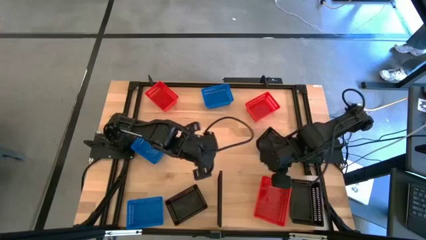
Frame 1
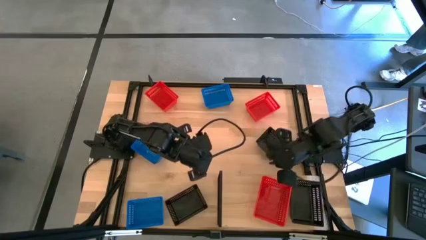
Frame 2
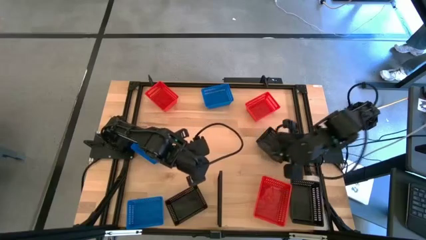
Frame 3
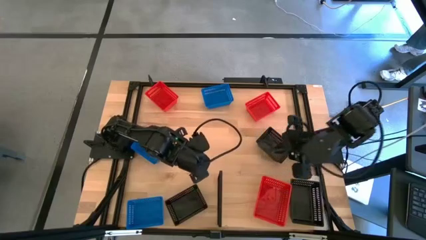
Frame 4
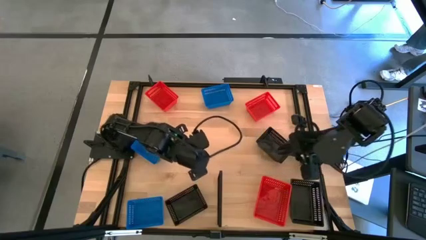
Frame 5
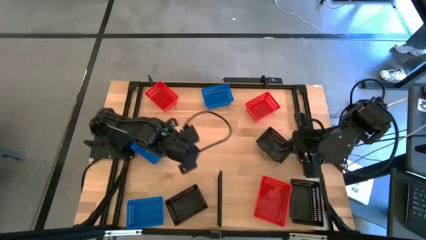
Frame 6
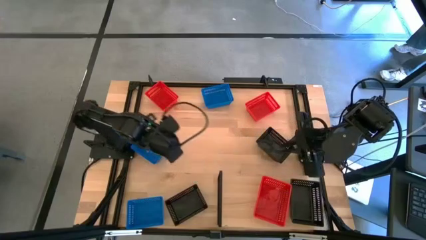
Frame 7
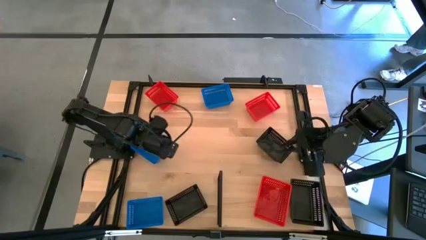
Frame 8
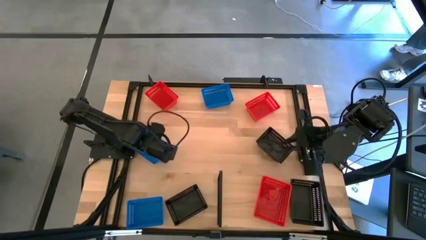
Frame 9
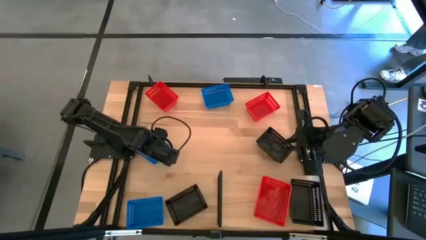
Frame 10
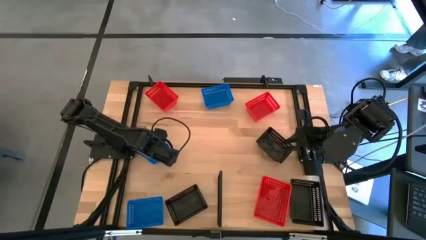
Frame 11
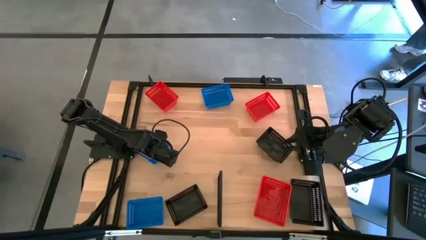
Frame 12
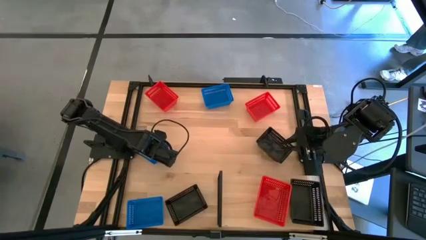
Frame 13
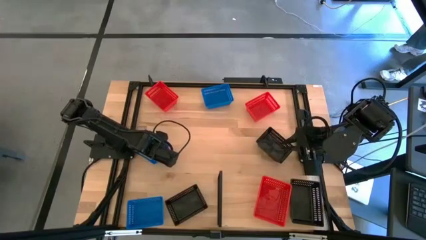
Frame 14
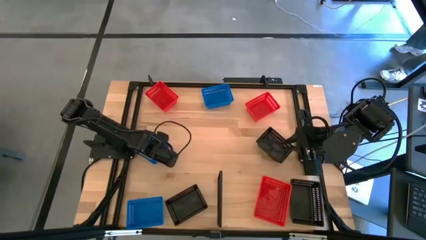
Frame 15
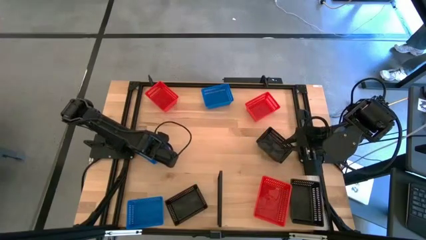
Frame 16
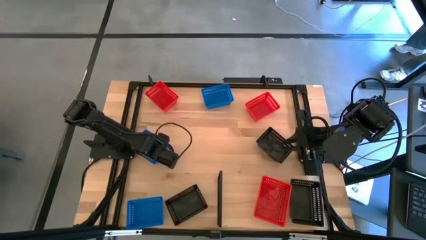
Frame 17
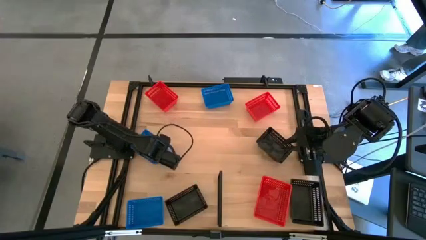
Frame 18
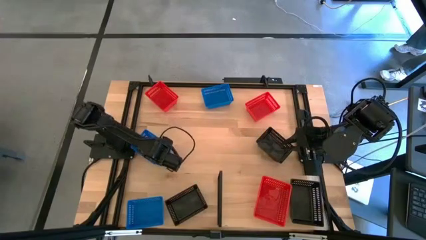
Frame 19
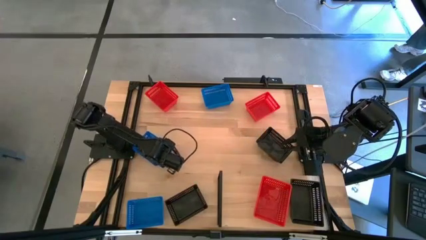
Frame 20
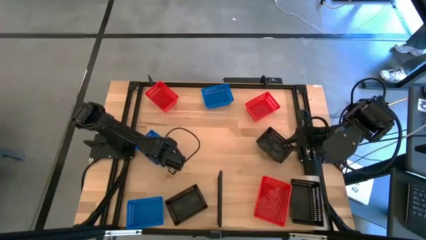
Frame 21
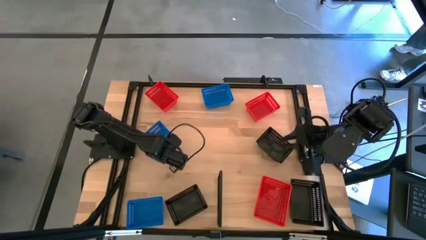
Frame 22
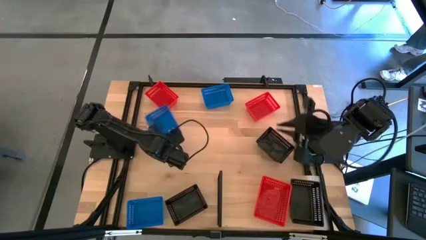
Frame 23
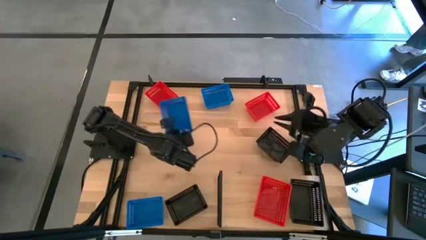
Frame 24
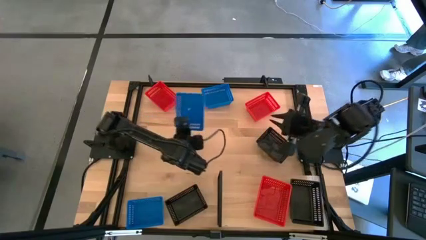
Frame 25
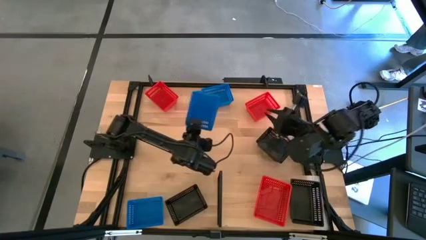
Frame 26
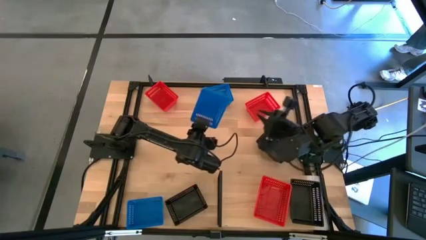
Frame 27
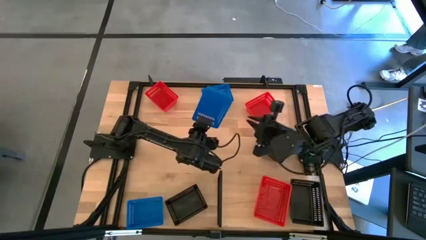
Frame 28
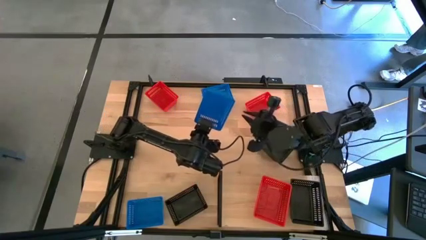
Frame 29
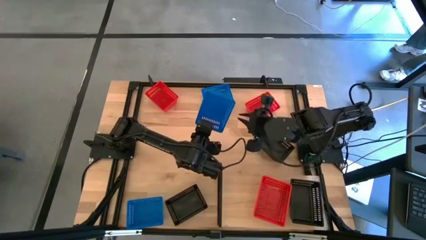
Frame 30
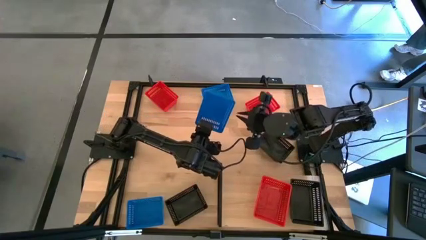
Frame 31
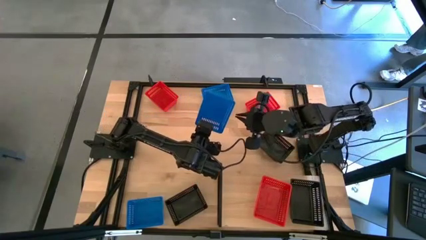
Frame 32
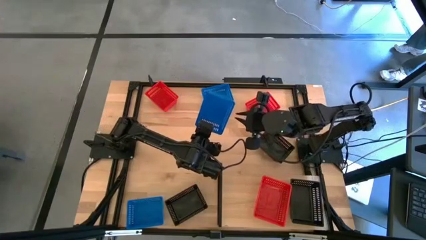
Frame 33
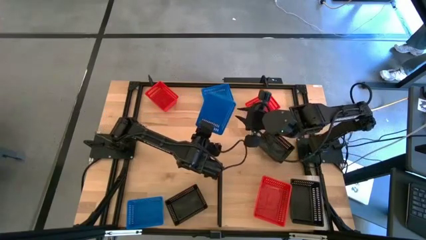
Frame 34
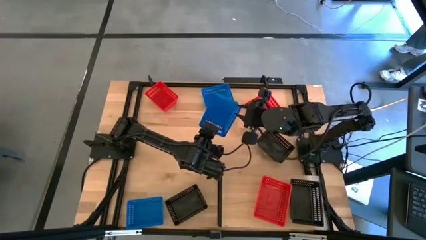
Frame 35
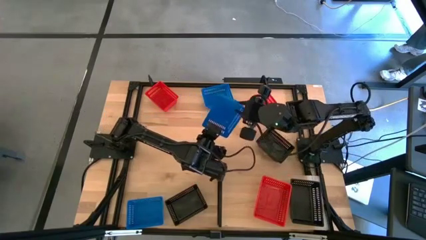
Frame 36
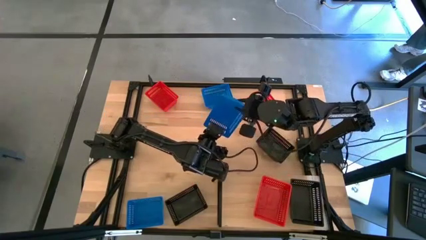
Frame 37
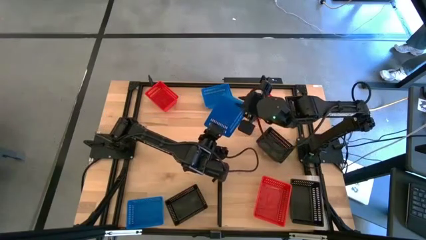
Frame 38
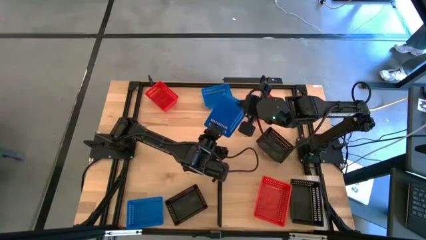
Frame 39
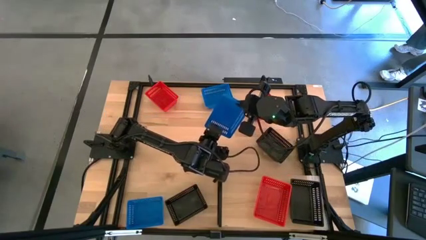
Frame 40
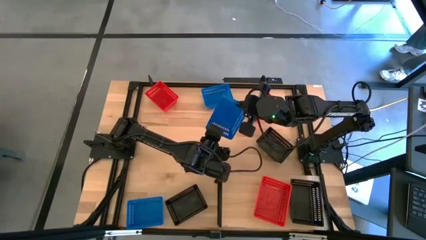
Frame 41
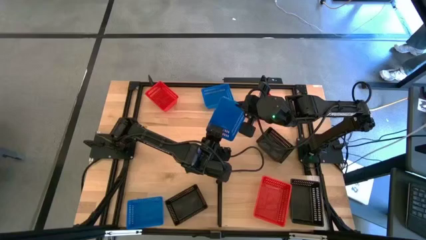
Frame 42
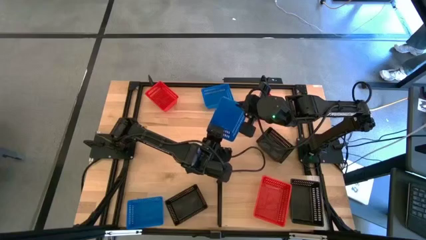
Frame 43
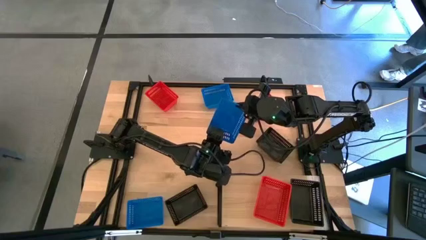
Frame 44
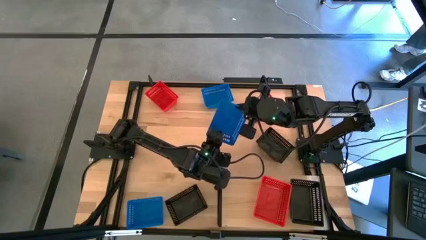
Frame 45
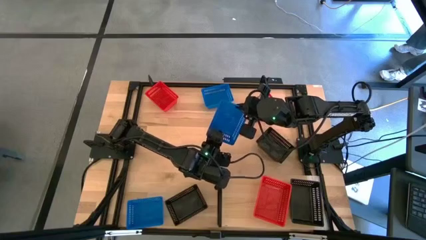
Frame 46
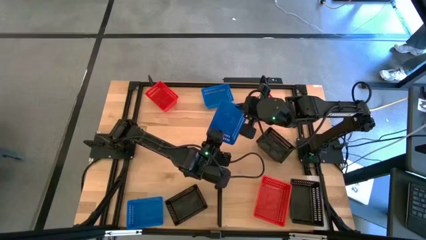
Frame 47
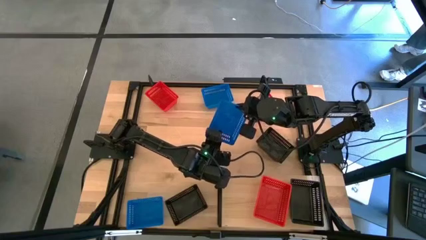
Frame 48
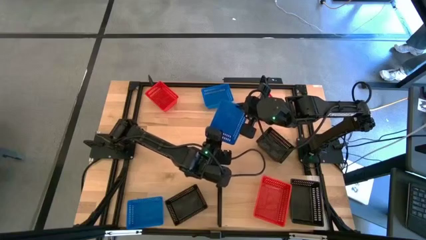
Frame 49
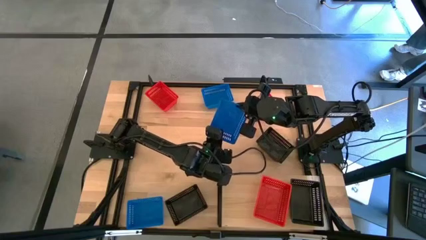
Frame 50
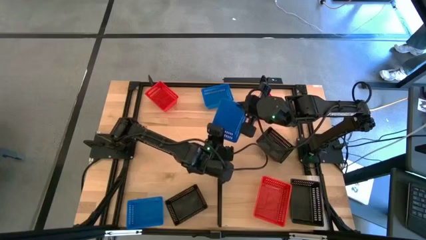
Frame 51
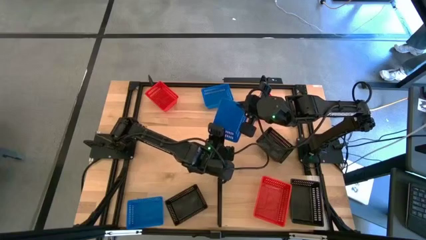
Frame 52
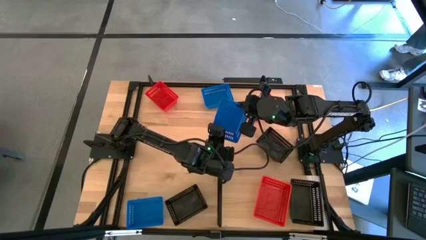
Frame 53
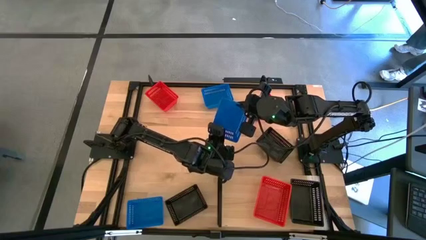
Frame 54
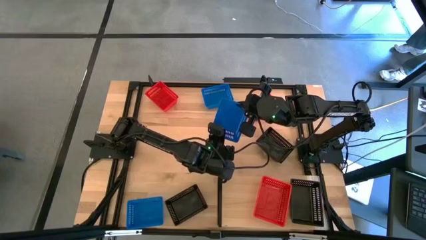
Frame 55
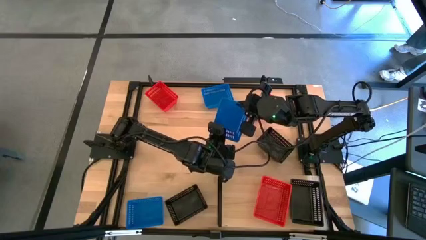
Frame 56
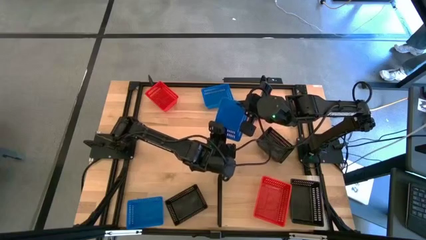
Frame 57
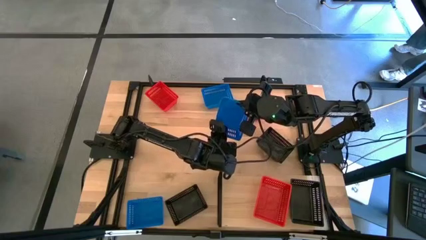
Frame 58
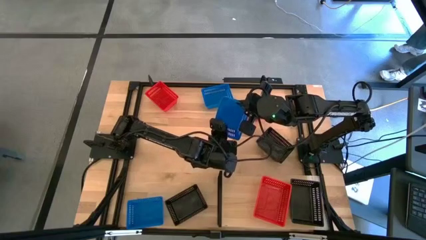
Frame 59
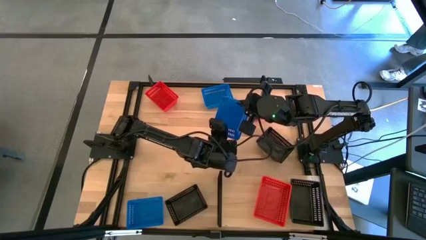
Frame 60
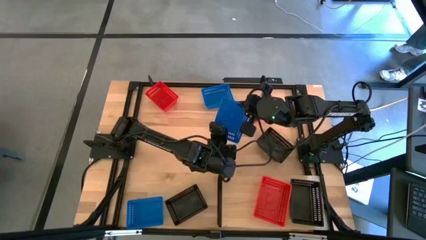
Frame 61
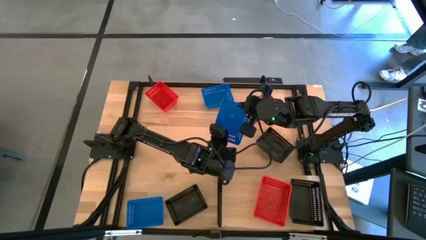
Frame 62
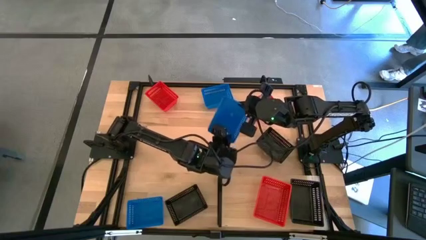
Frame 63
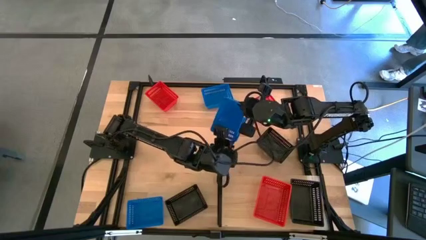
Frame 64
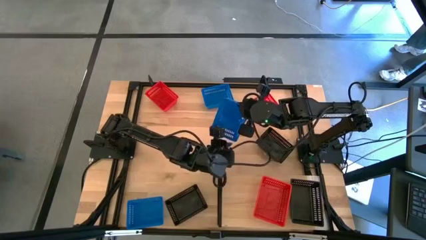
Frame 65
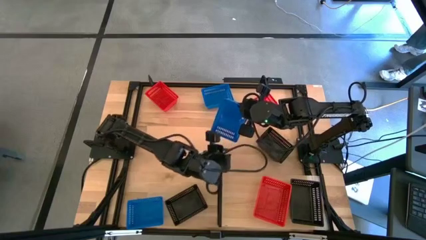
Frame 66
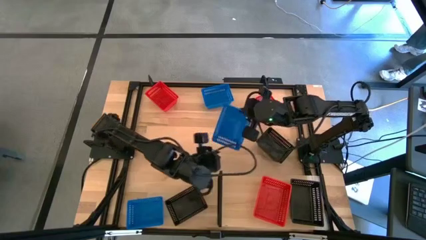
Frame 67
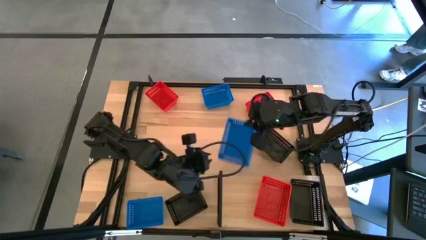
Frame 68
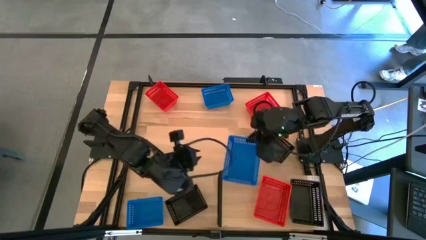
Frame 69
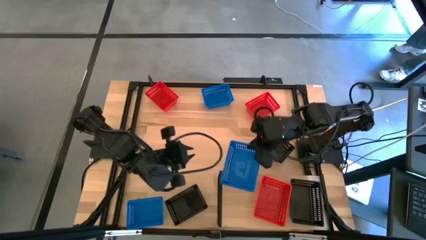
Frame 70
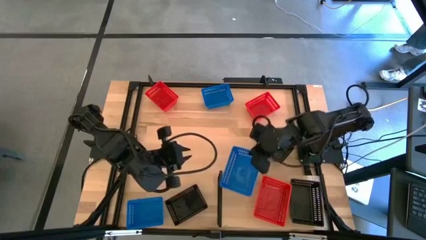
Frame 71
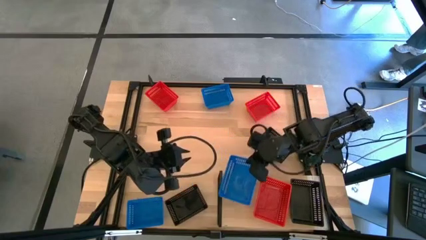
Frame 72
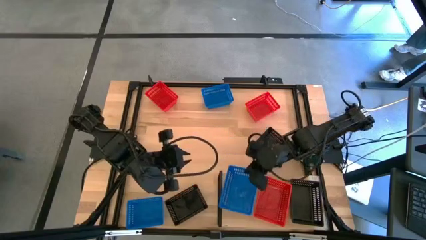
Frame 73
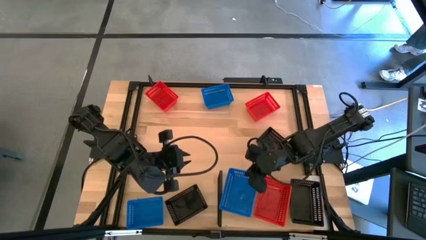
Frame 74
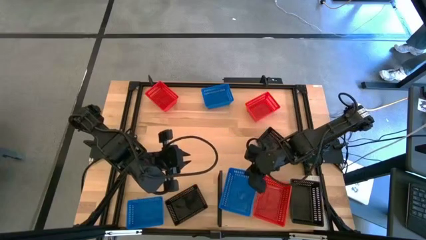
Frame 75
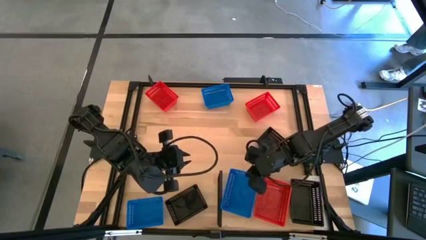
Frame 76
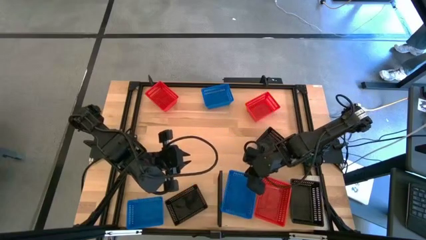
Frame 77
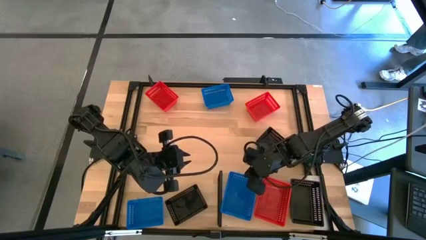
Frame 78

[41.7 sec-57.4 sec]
Task: Stack baskets on shelf by color
Put the middle blue bin on the shelf
